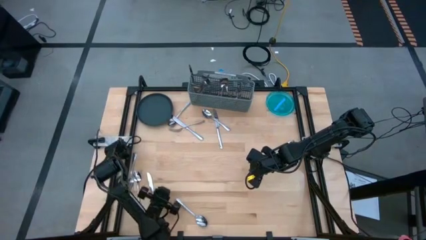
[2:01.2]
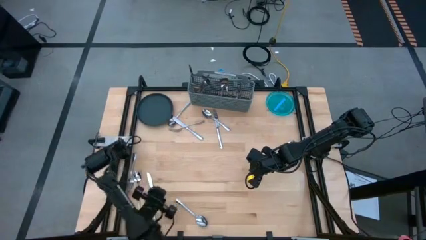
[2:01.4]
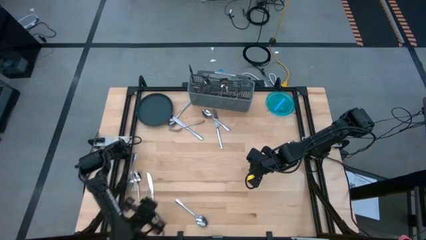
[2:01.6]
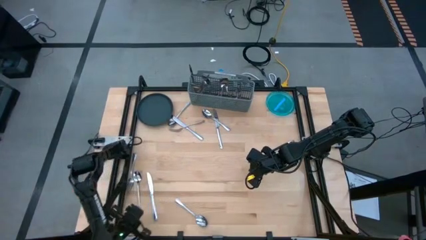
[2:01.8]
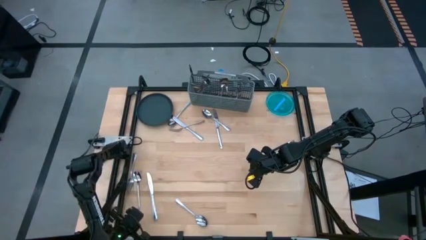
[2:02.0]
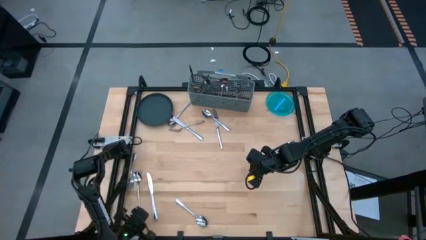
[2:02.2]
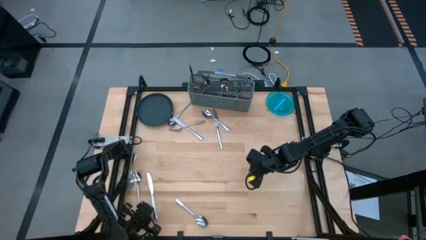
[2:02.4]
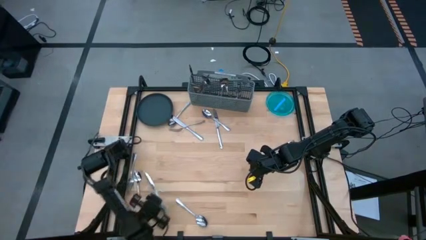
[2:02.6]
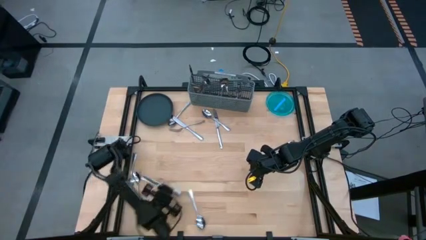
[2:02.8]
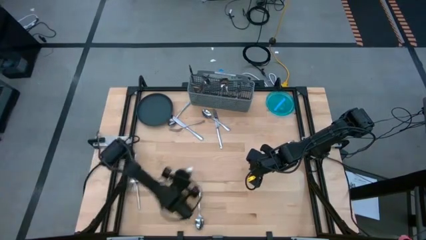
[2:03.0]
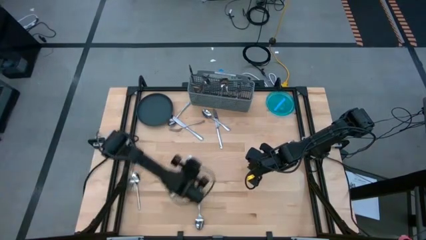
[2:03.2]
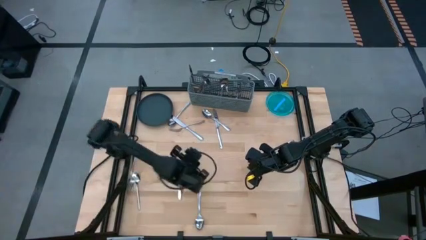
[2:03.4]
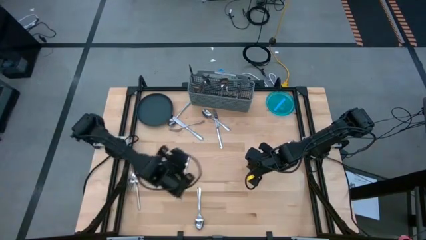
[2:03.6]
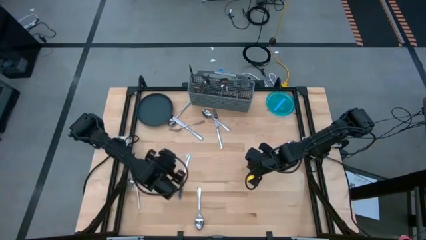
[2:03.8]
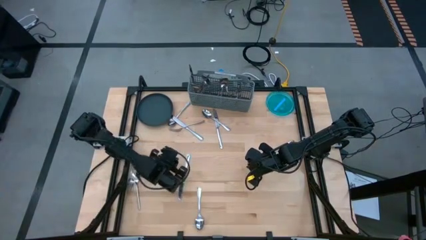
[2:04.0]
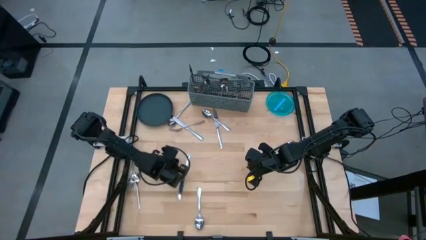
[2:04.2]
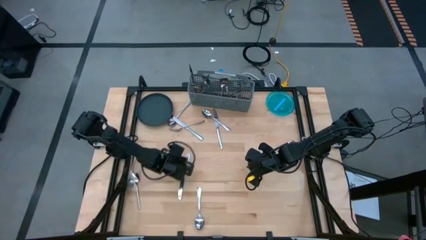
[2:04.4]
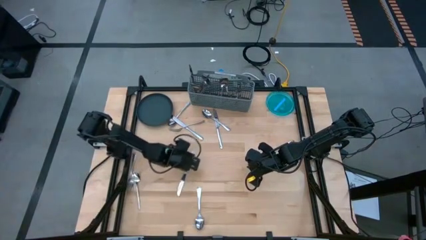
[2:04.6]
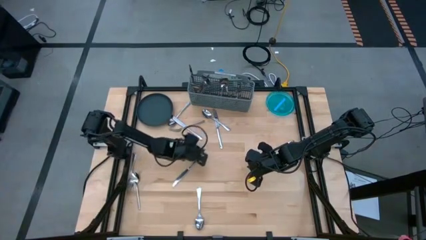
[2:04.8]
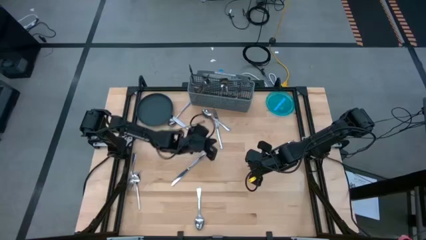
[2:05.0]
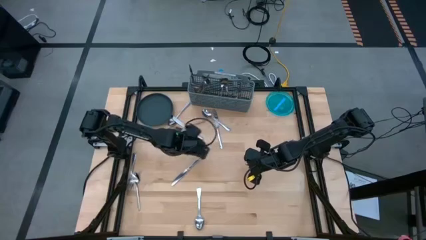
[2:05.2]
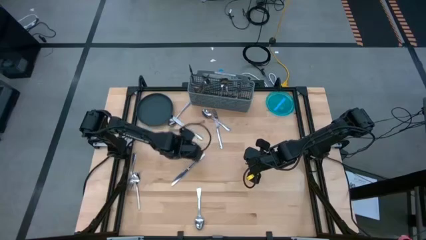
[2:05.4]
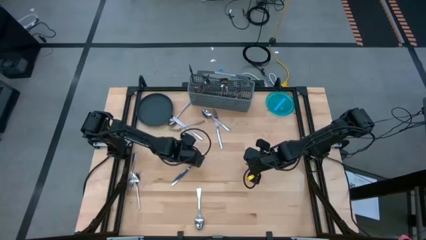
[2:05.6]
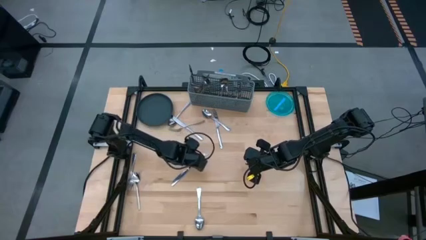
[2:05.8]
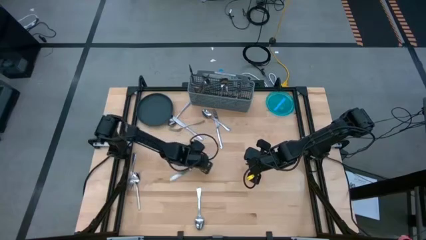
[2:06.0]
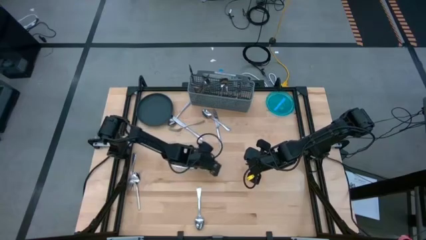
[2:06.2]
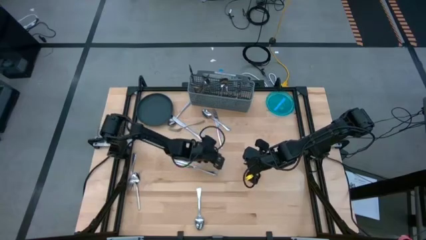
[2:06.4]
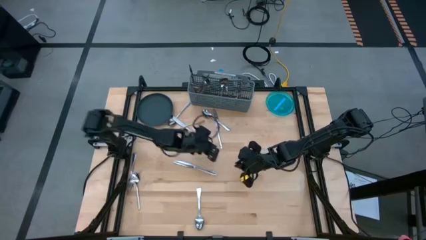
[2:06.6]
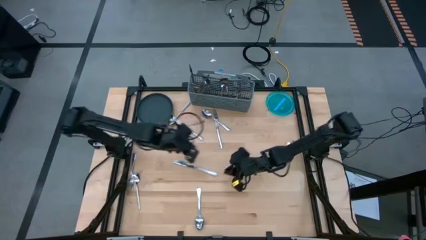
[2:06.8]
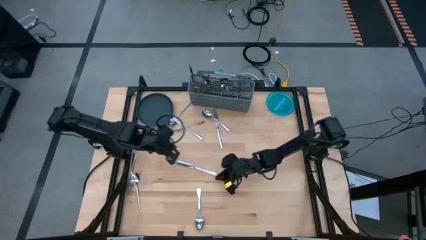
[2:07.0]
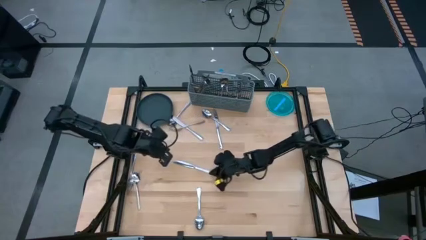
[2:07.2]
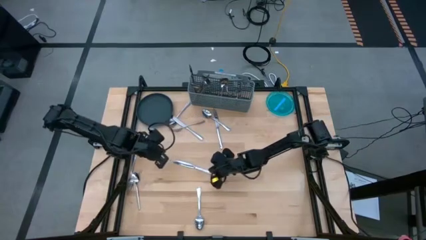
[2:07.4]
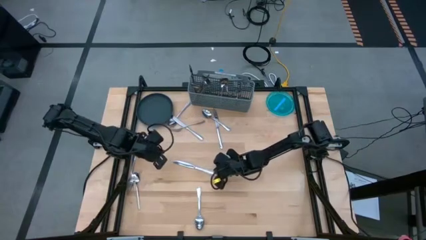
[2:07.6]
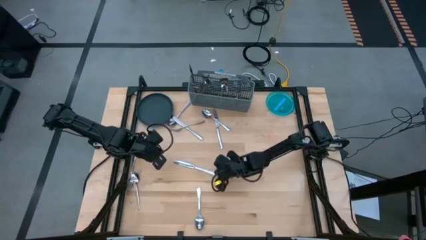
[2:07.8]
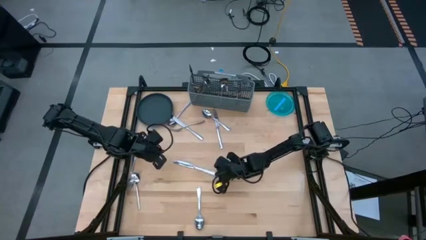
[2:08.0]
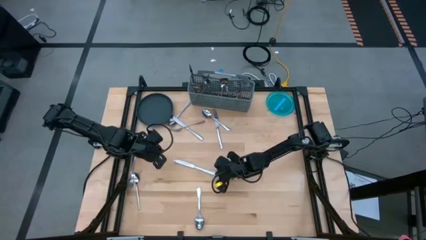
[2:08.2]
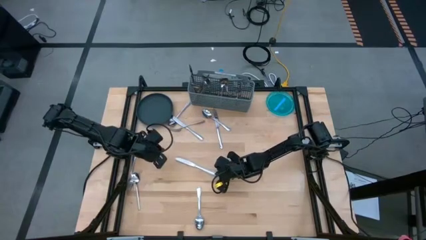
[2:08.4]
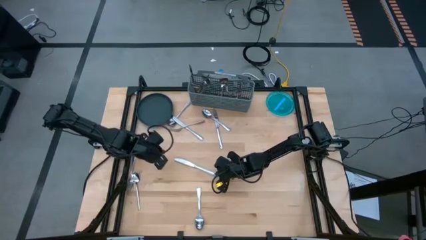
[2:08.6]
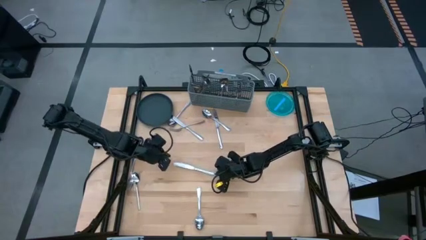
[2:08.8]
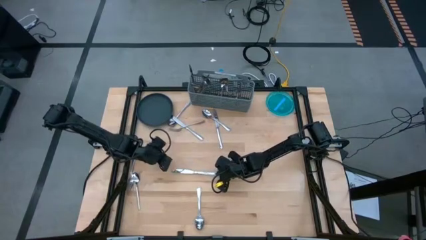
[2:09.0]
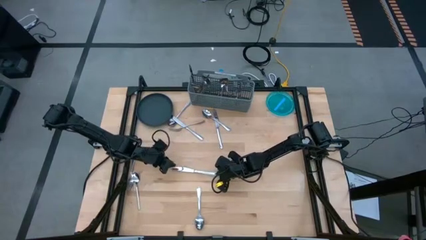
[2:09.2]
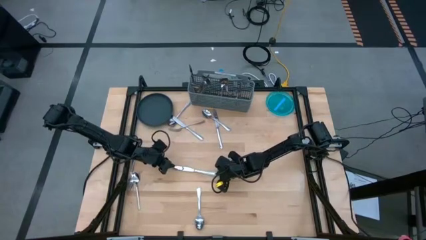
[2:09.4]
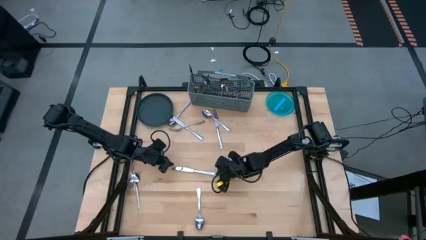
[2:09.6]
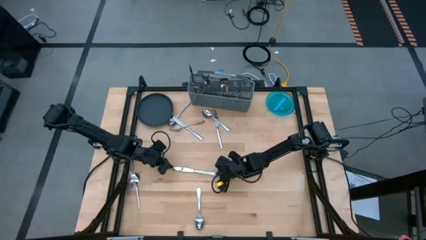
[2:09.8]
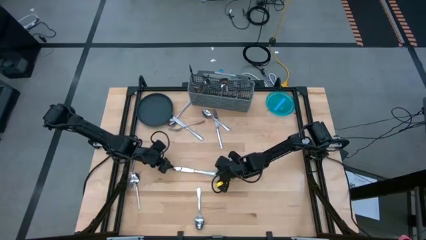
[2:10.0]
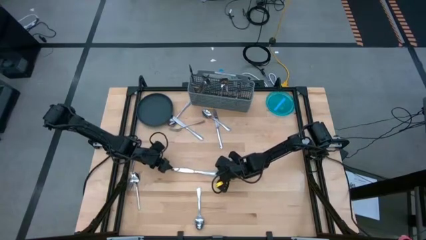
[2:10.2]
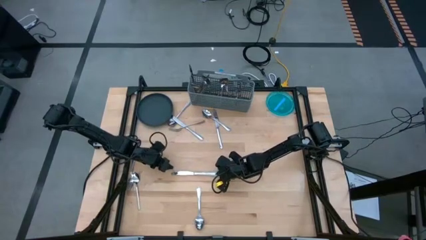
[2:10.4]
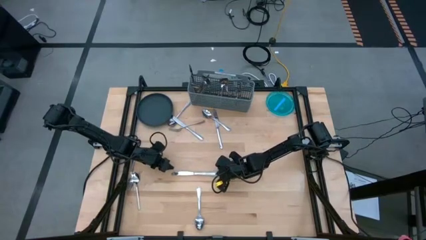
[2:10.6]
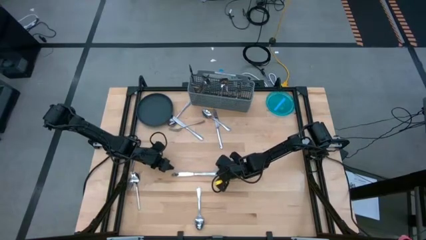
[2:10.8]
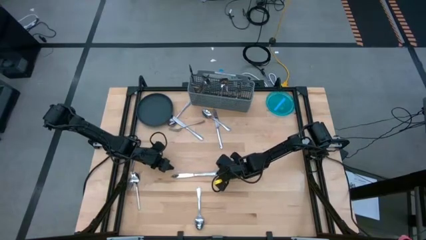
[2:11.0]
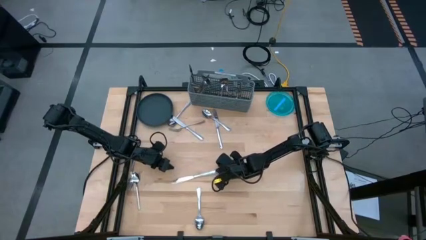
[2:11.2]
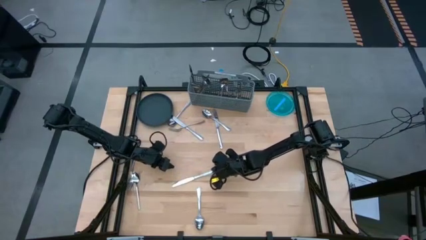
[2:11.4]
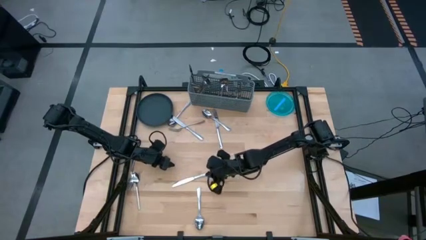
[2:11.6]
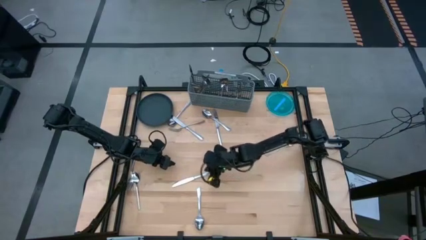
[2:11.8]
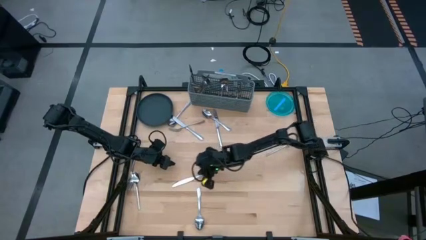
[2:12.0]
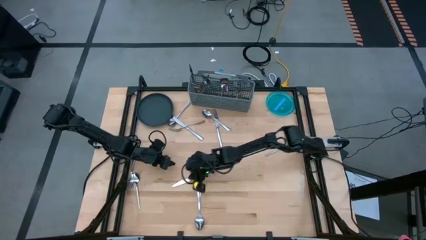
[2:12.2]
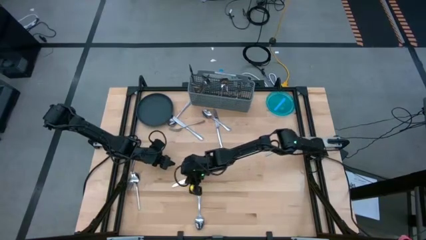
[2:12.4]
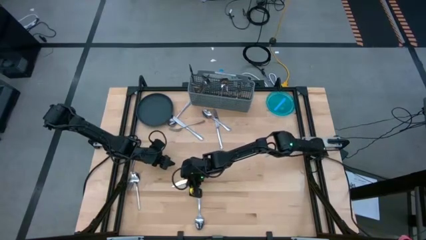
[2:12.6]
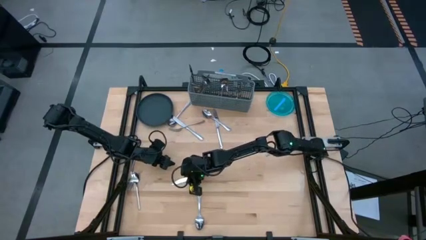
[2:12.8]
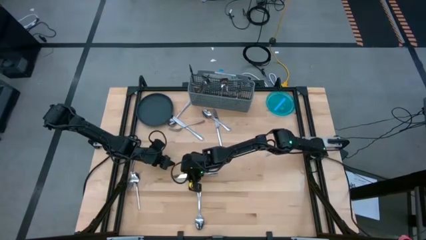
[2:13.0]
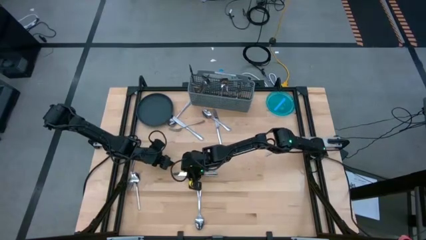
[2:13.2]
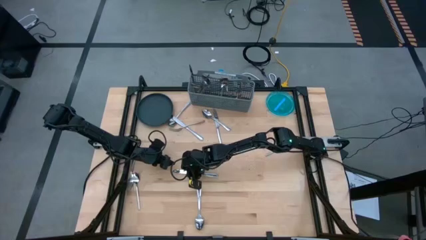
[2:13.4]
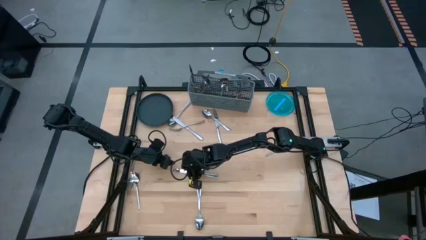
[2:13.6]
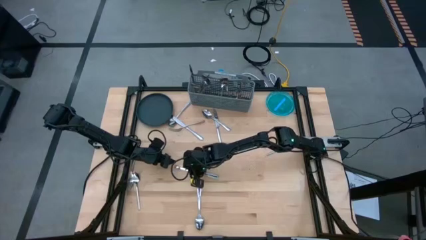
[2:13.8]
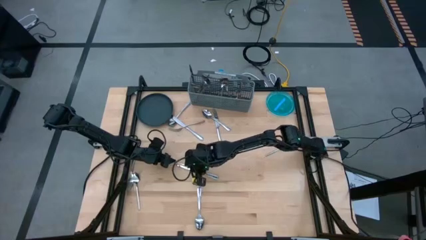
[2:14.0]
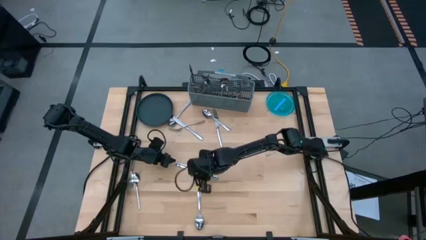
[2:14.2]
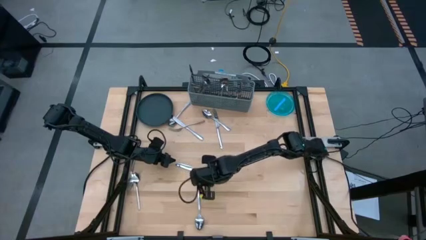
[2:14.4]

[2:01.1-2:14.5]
Task: Sort silverware
Put the knife into the silverware basket
